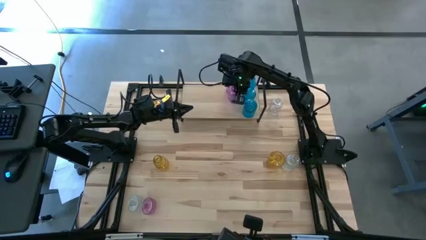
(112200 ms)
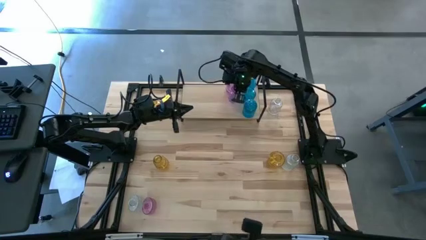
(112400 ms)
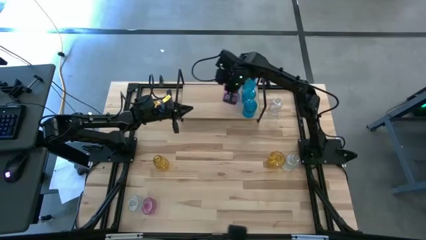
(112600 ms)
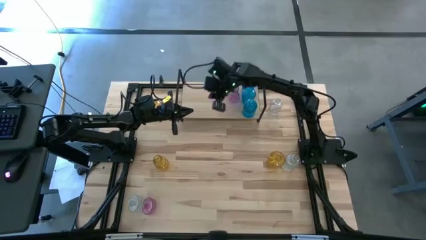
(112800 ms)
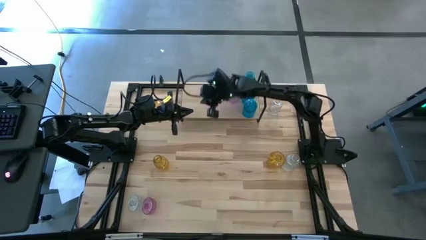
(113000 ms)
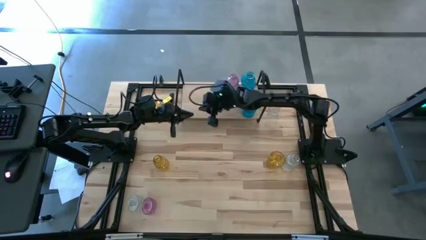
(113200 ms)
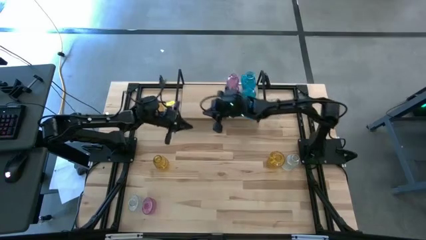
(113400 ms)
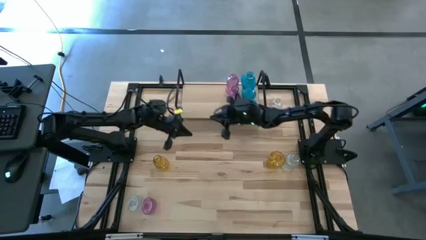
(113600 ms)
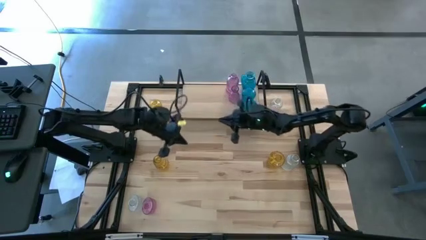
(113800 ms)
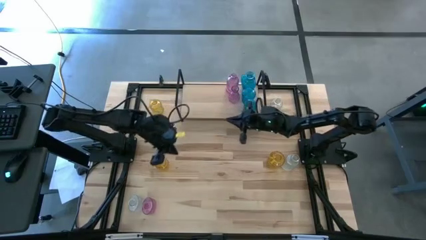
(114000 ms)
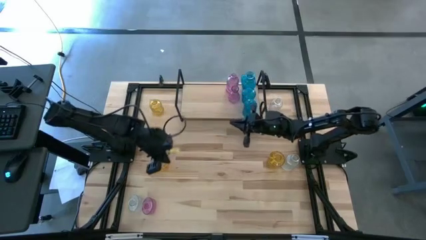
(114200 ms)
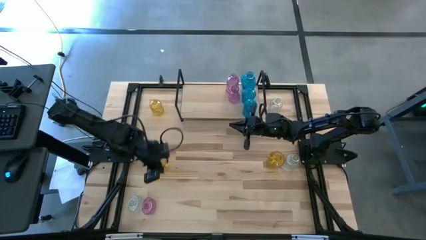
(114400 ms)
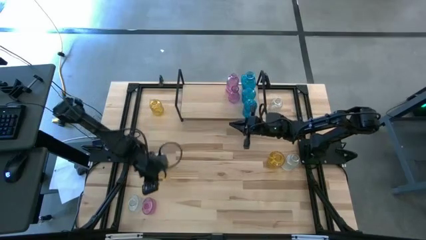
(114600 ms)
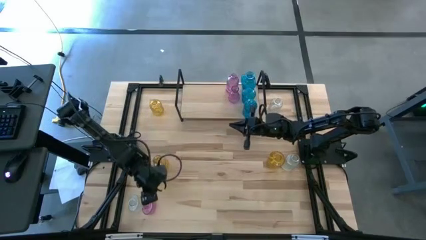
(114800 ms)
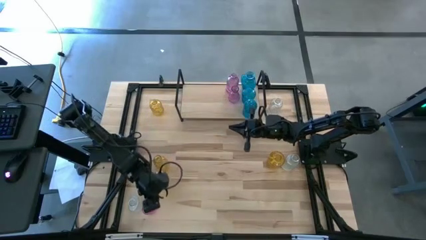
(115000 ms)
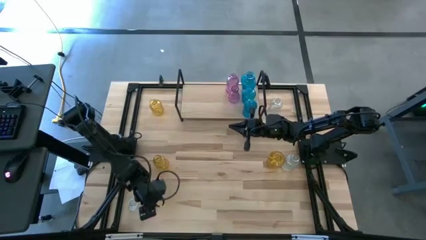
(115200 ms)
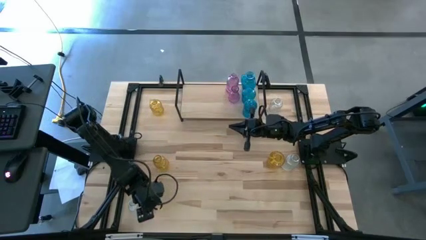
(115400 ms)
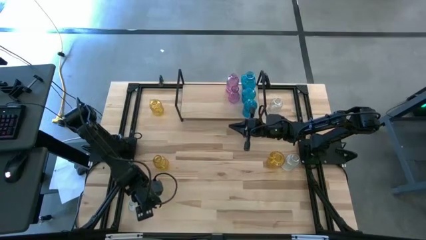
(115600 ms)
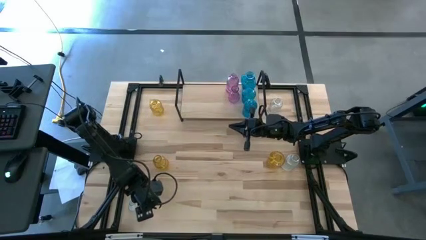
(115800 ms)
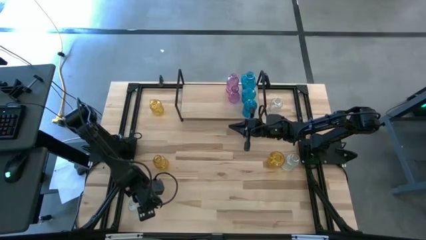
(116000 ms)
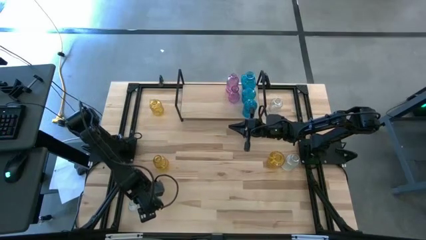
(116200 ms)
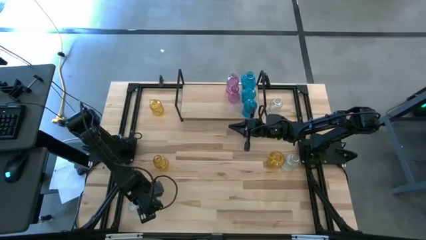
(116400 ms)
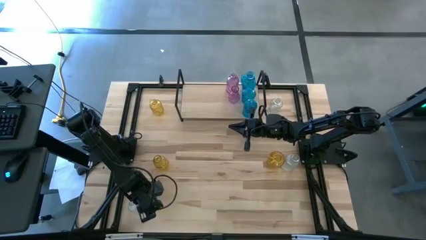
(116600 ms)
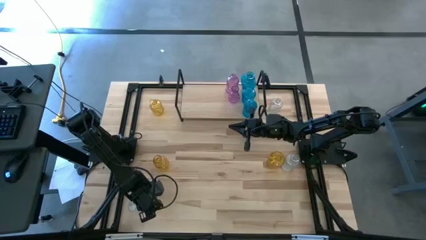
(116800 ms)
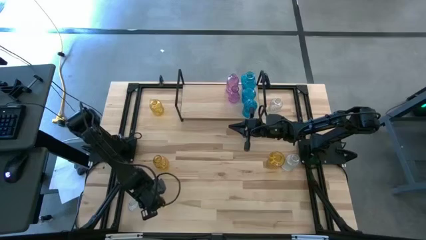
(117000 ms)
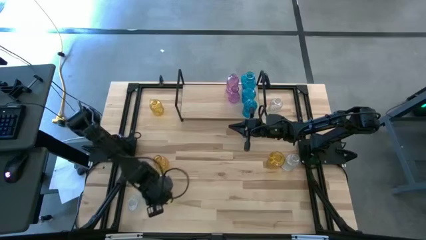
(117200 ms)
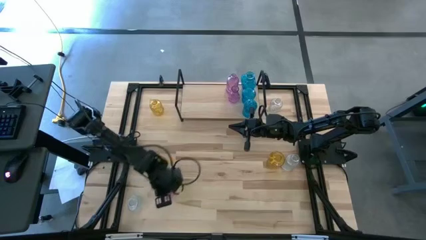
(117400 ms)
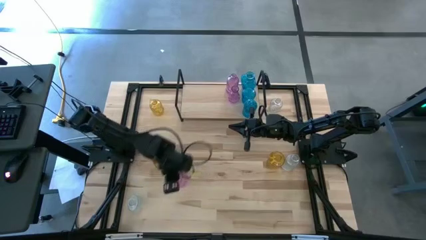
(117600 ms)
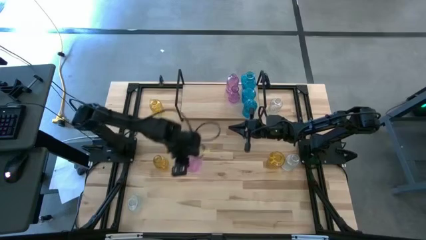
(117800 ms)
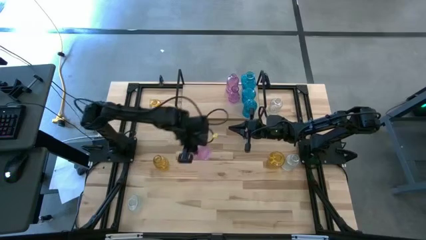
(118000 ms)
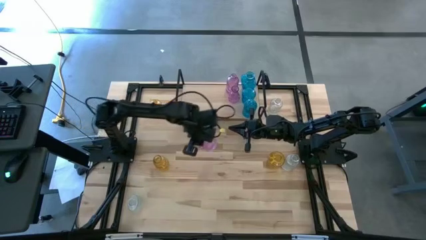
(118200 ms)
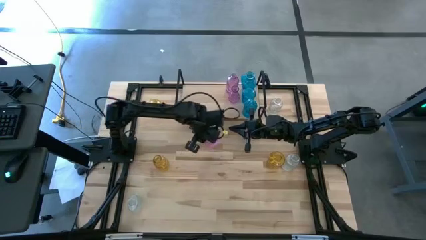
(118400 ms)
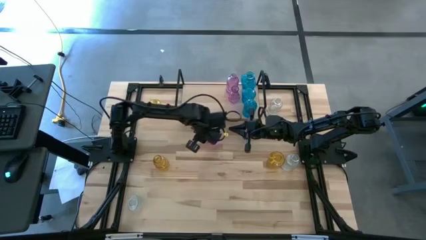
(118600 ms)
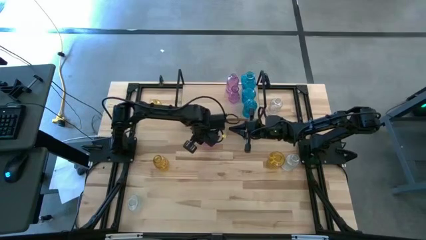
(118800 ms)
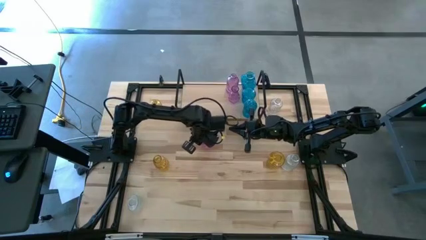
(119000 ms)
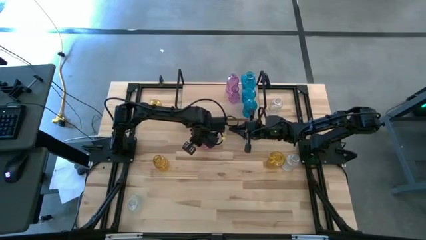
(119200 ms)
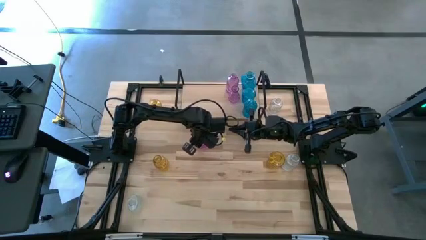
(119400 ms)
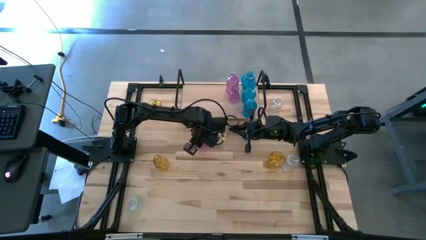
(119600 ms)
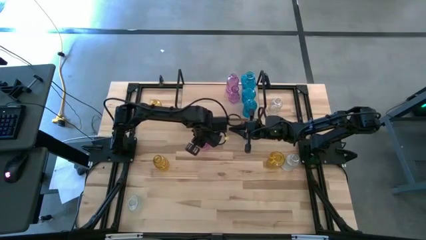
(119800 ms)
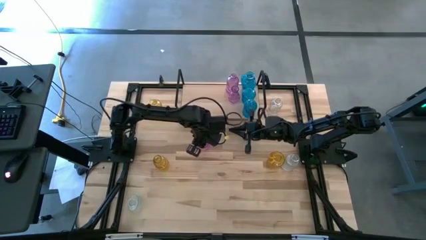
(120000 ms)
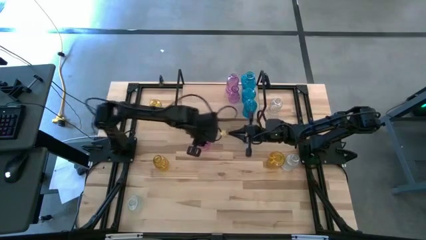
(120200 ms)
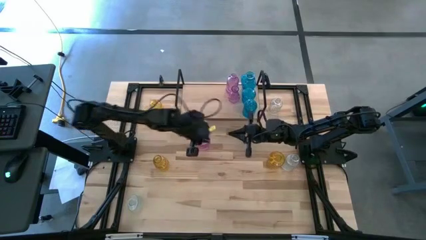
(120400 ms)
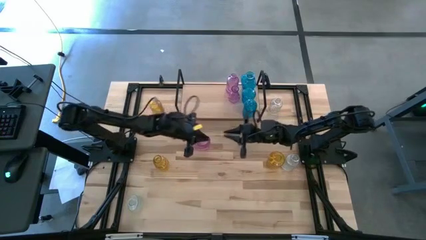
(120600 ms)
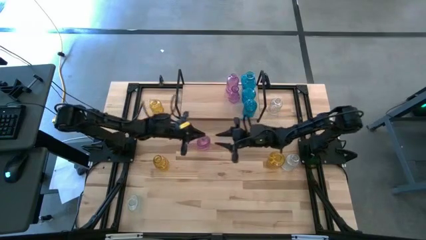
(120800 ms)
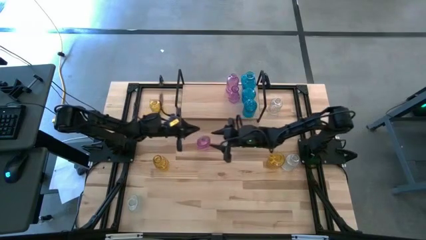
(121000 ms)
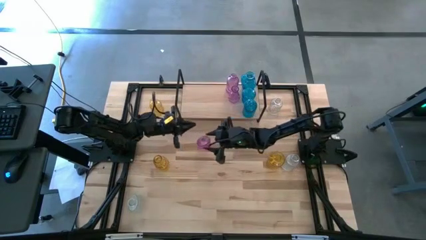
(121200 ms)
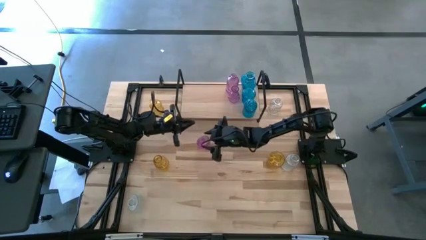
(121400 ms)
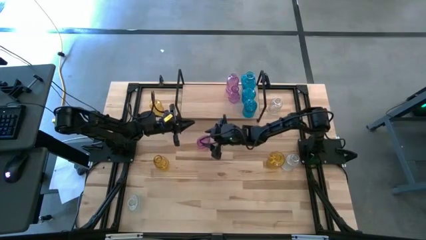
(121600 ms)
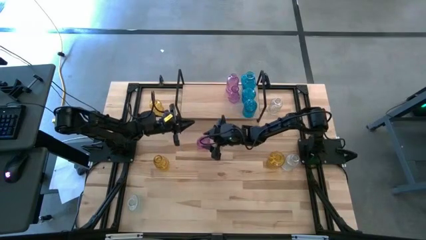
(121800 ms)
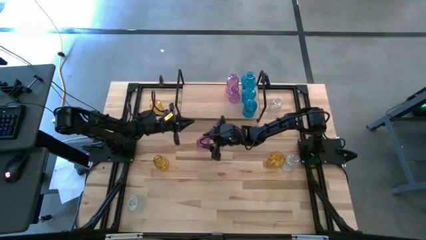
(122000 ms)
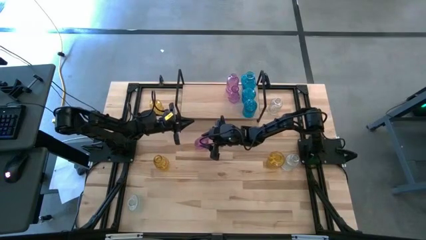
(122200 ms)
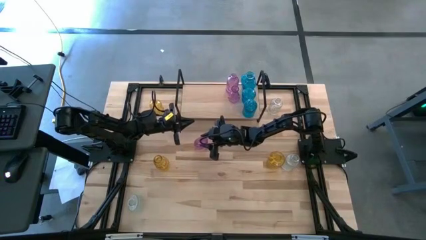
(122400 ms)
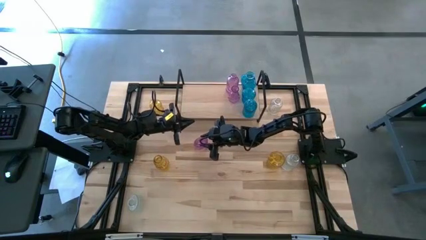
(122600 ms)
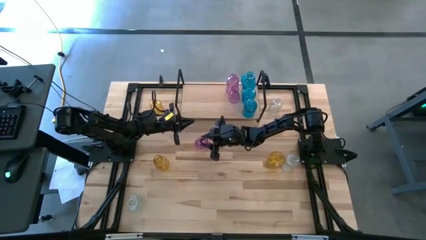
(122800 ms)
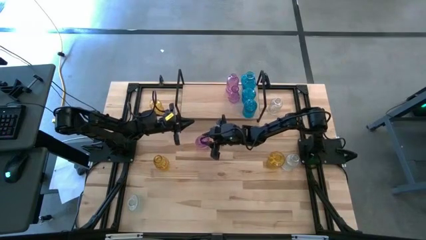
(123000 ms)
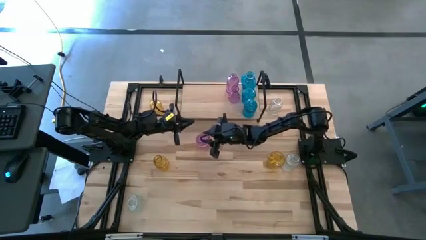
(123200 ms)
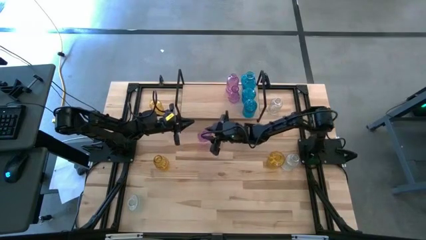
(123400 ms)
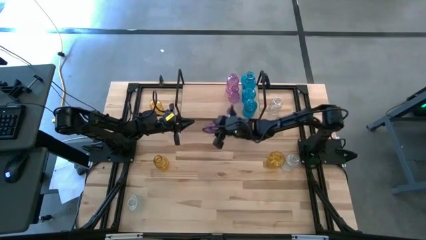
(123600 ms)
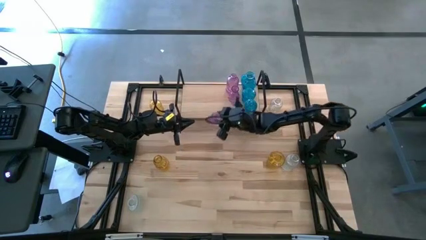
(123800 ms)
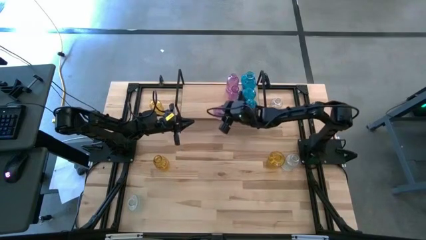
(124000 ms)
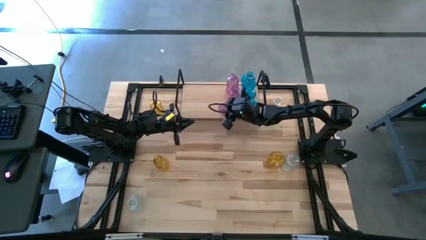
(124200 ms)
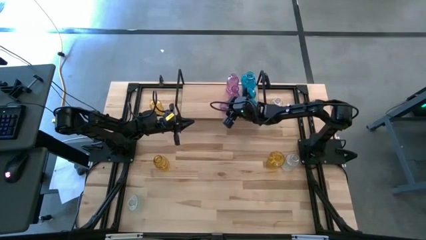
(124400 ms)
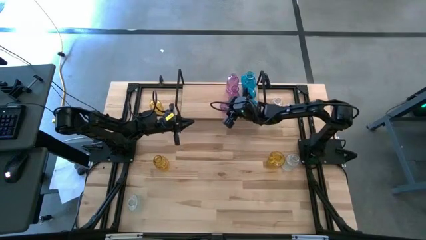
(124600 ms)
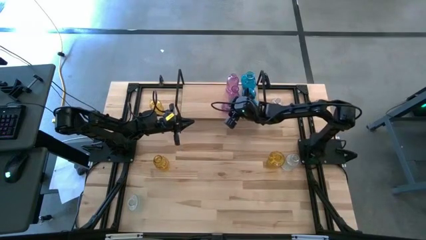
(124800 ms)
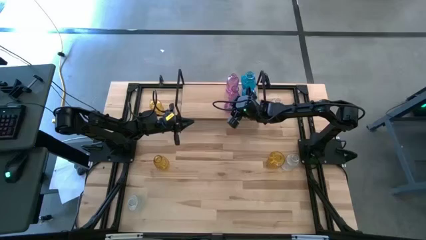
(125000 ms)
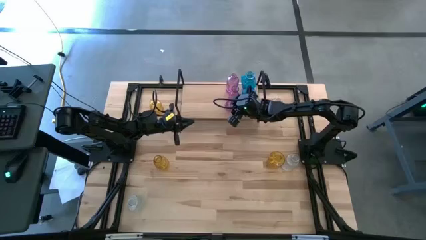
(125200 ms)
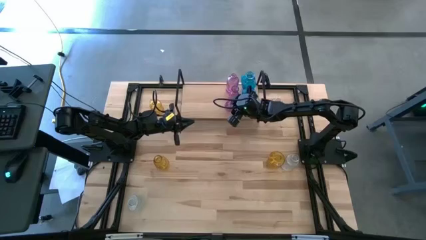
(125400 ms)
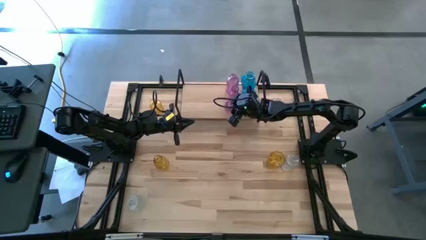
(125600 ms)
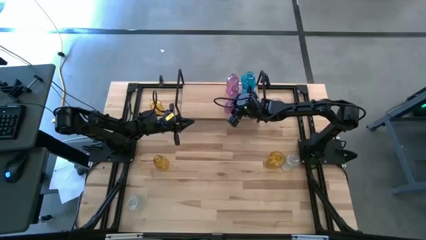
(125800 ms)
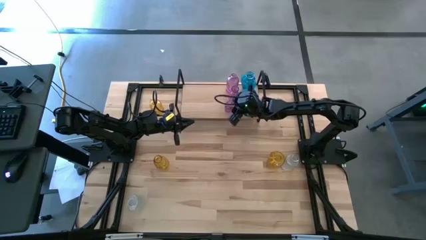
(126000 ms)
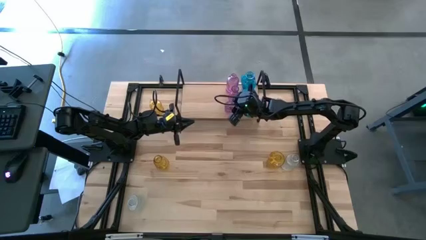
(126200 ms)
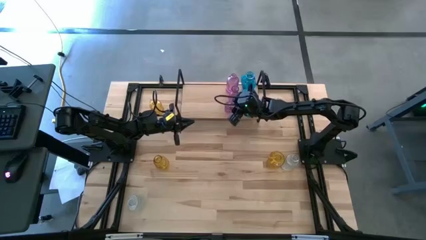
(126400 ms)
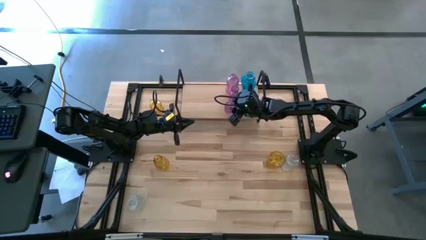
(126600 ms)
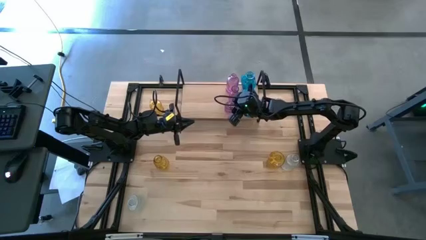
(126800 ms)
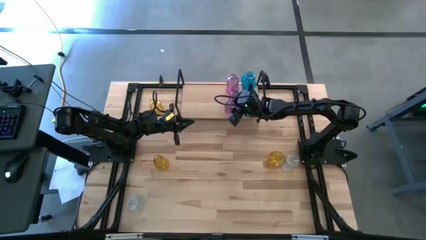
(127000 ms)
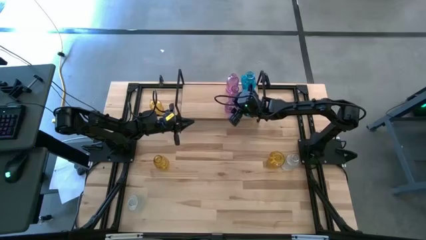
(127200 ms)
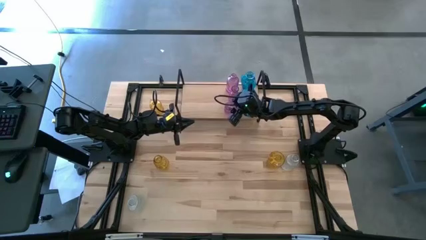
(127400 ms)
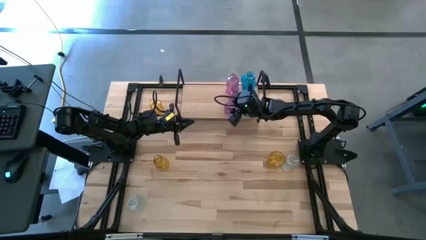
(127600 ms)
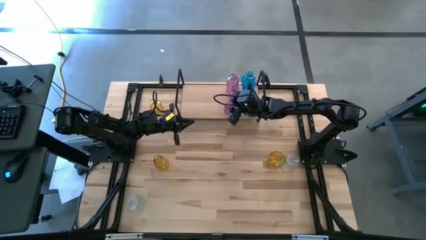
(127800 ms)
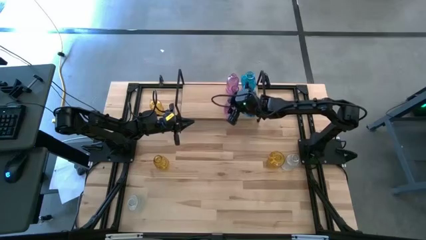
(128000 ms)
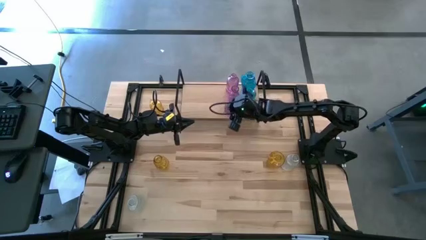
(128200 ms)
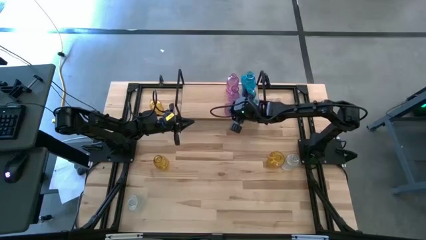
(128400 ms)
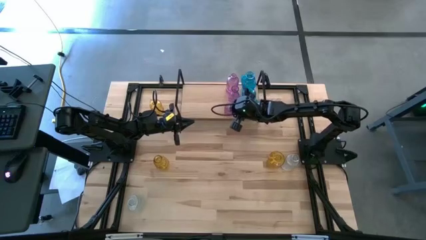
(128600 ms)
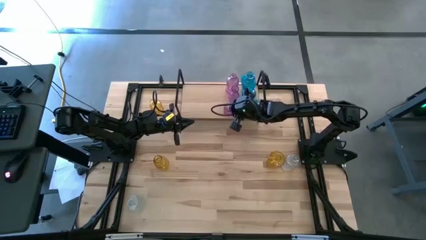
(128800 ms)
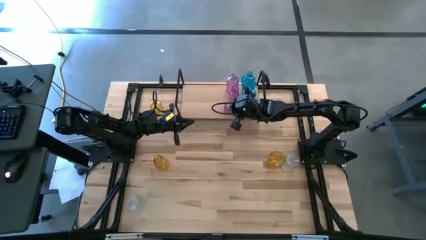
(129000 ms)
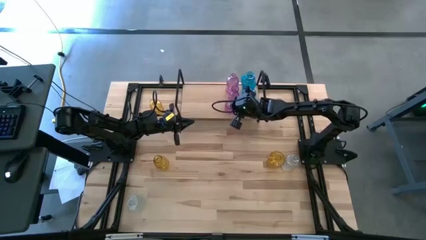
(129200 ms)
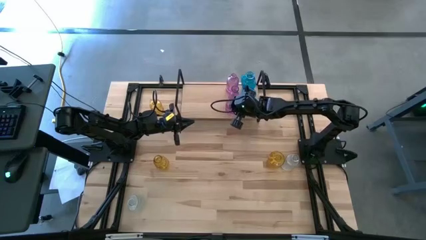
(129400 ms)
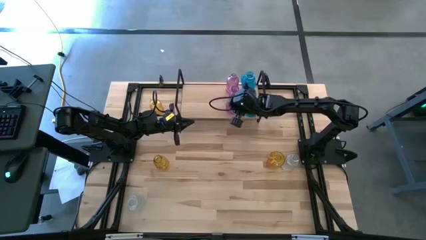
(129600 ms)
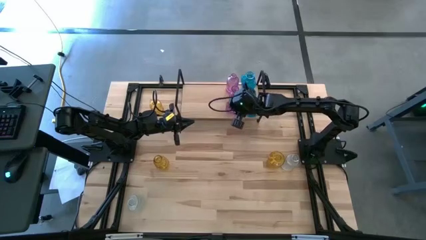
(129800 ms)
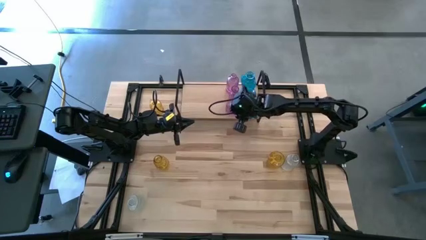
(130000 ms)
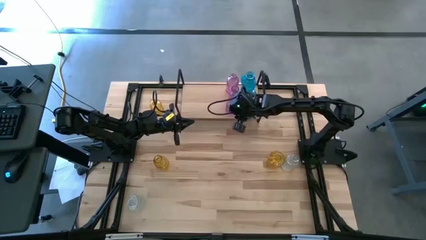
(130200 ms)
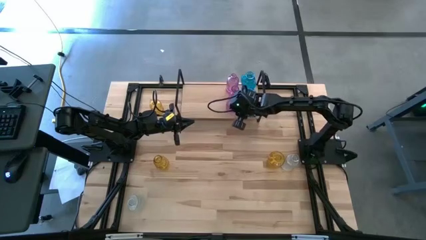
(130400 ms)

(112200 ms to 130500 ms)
Task: sort vases onto shelf
Put the purple vase on the shelf aligned with the other purple vases
